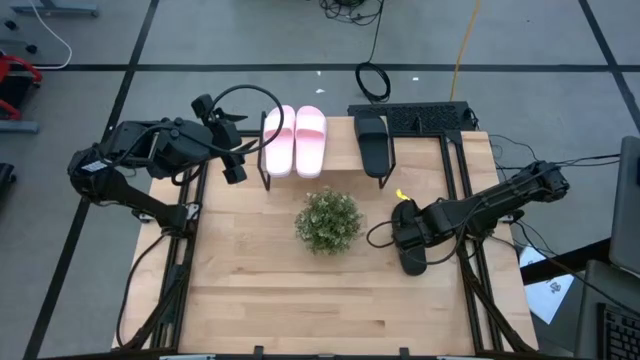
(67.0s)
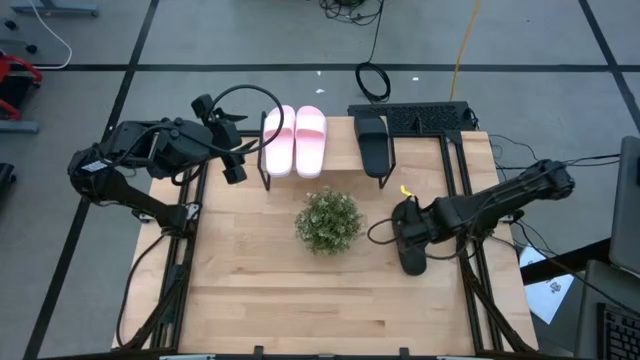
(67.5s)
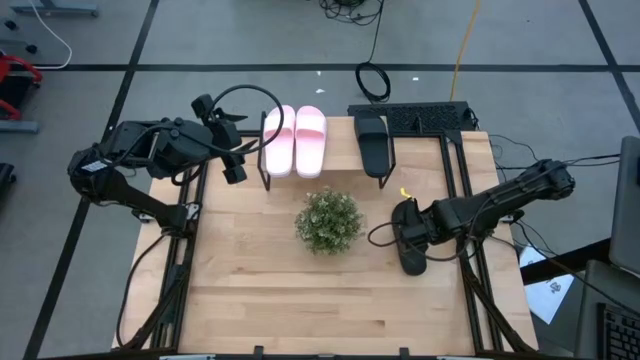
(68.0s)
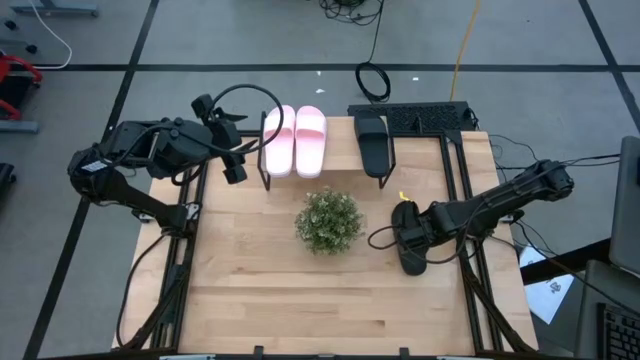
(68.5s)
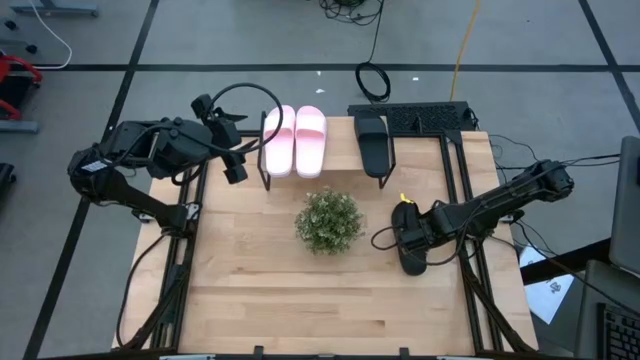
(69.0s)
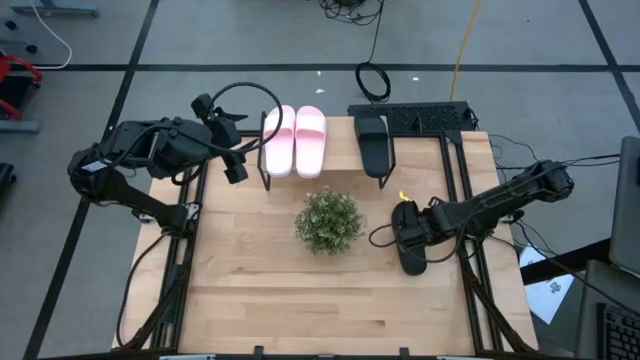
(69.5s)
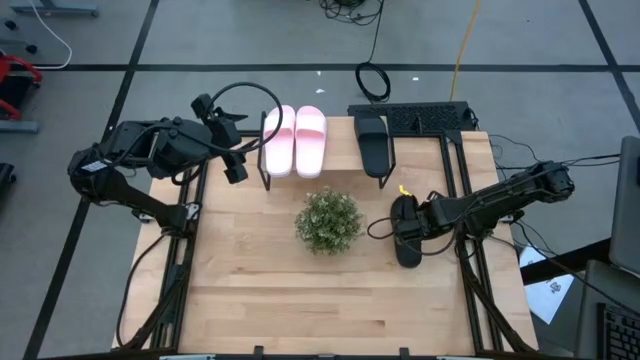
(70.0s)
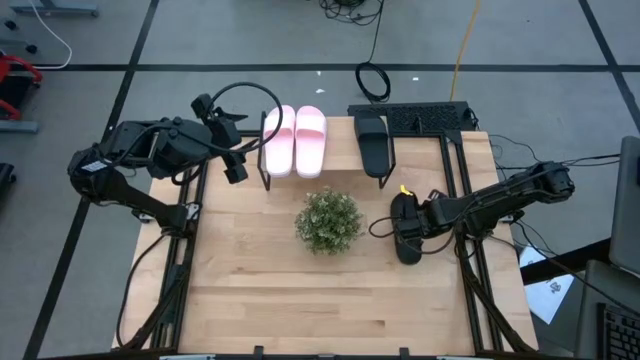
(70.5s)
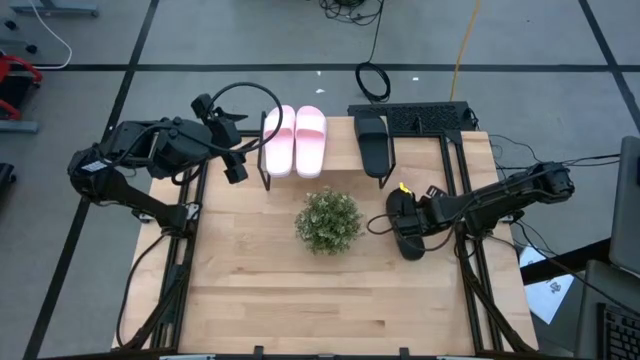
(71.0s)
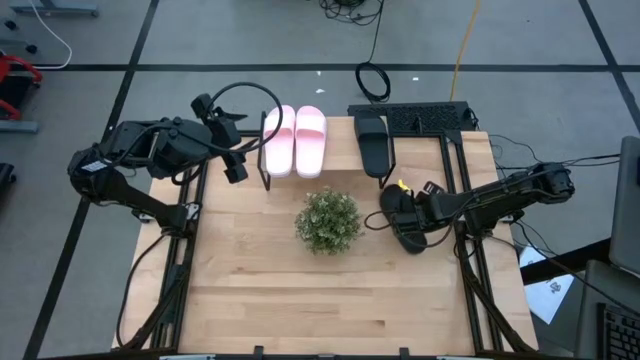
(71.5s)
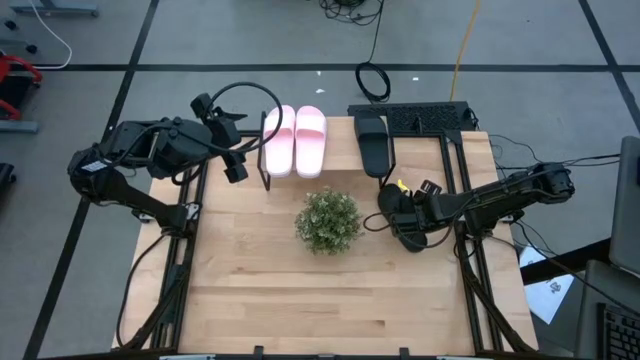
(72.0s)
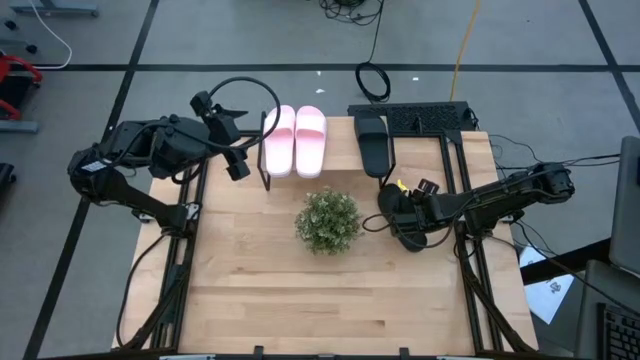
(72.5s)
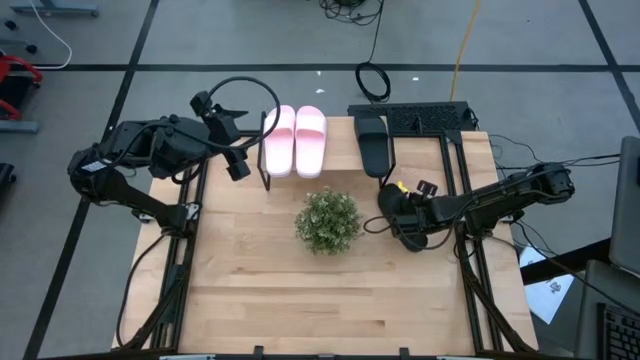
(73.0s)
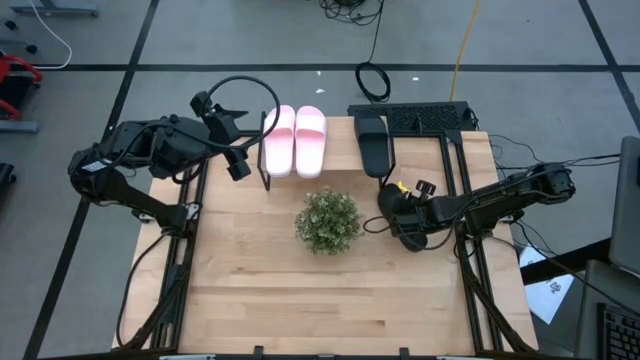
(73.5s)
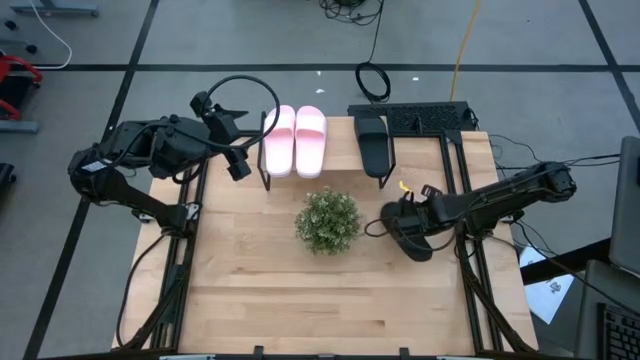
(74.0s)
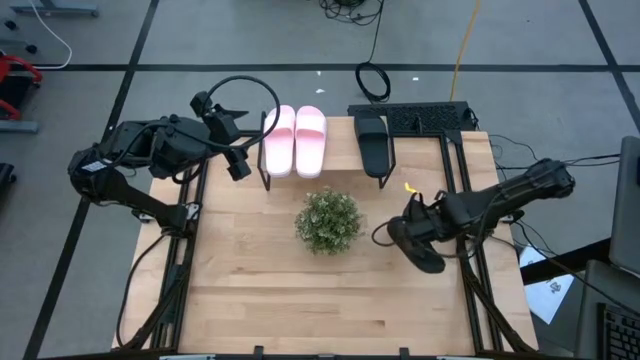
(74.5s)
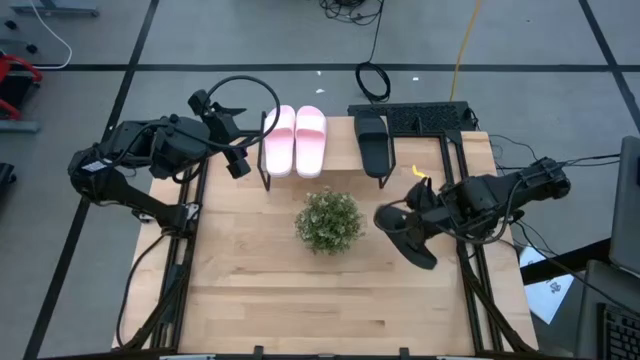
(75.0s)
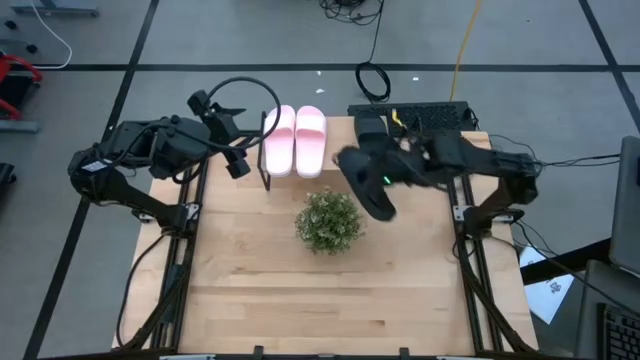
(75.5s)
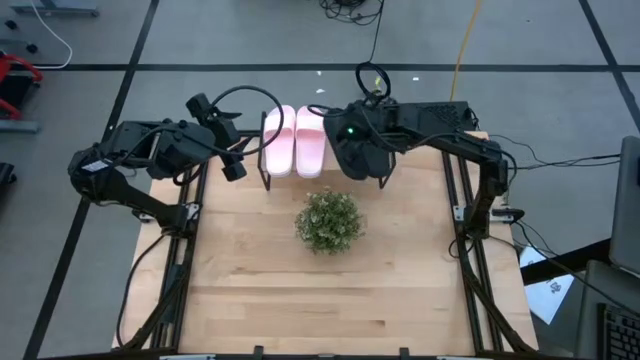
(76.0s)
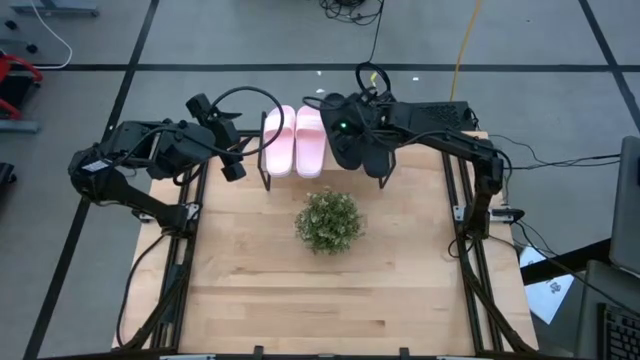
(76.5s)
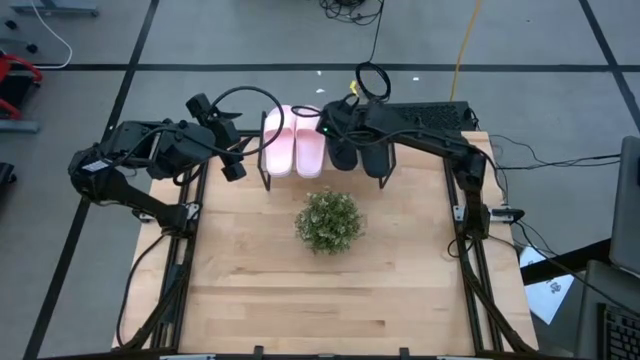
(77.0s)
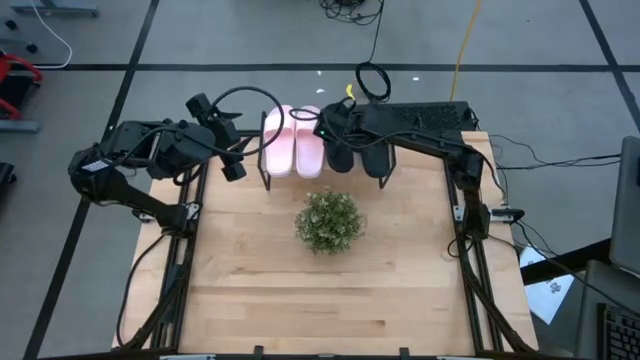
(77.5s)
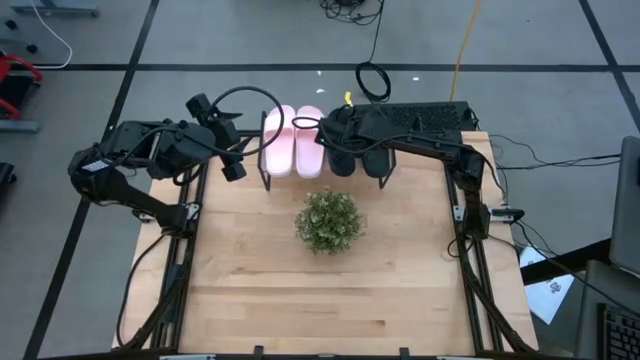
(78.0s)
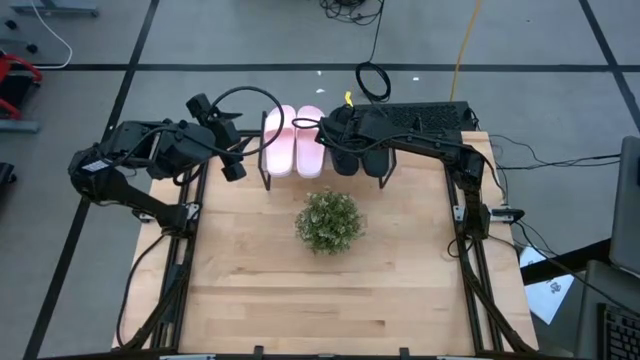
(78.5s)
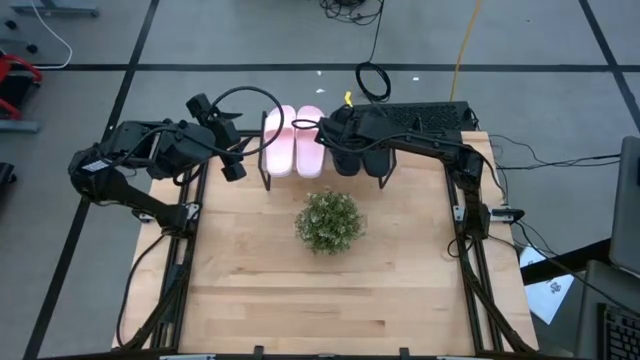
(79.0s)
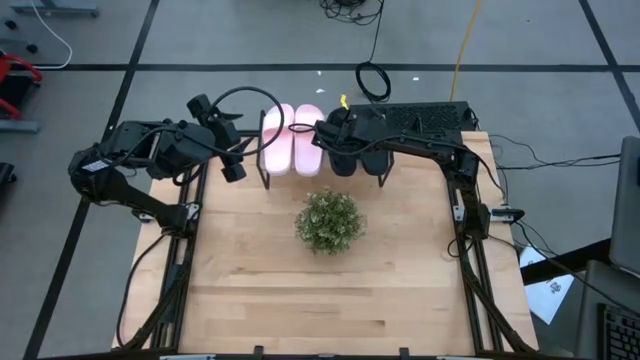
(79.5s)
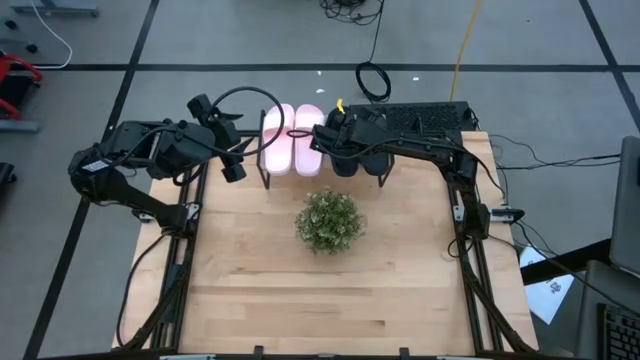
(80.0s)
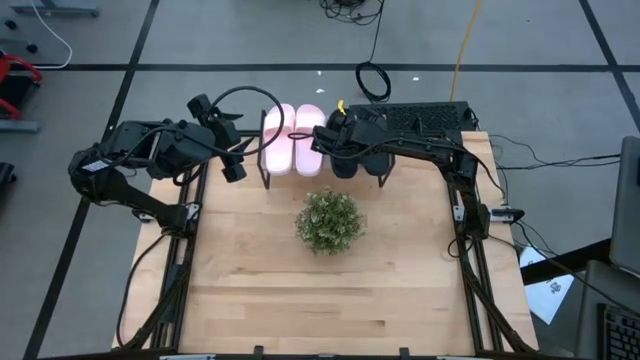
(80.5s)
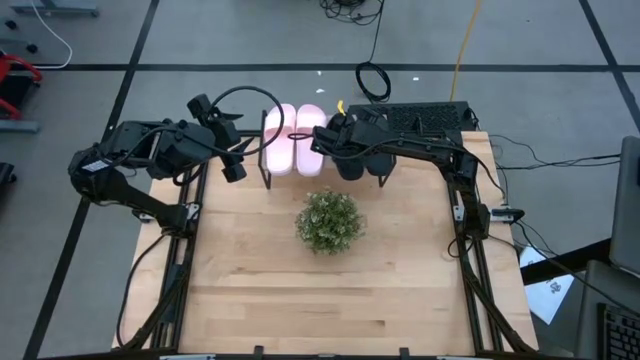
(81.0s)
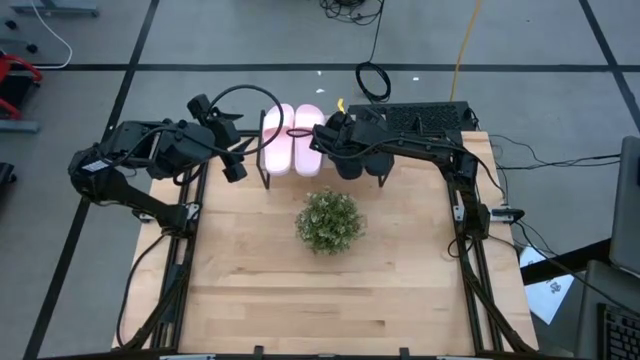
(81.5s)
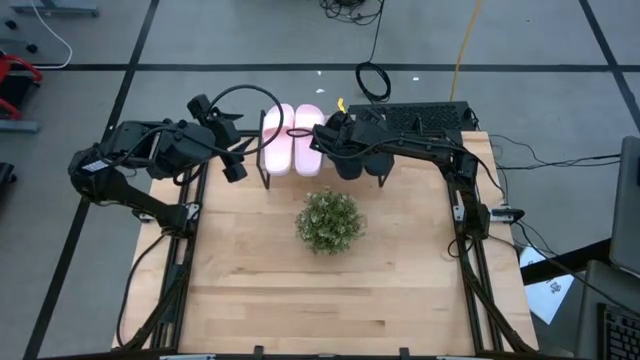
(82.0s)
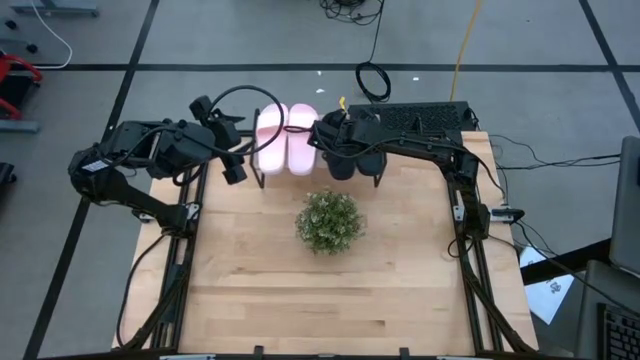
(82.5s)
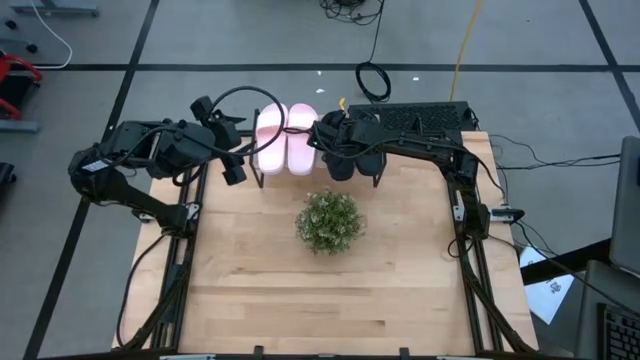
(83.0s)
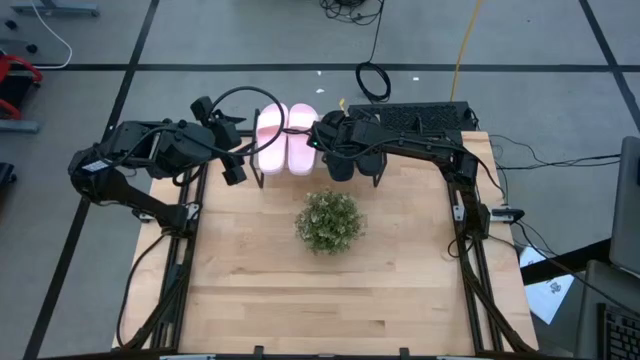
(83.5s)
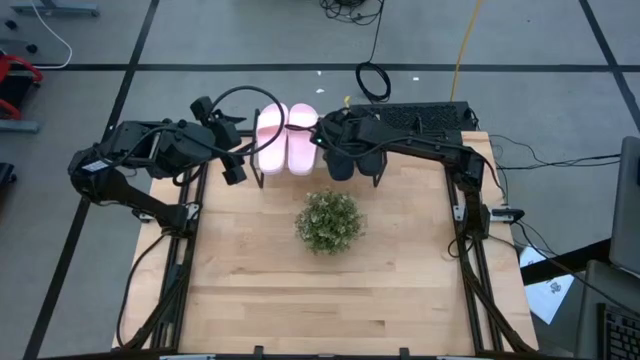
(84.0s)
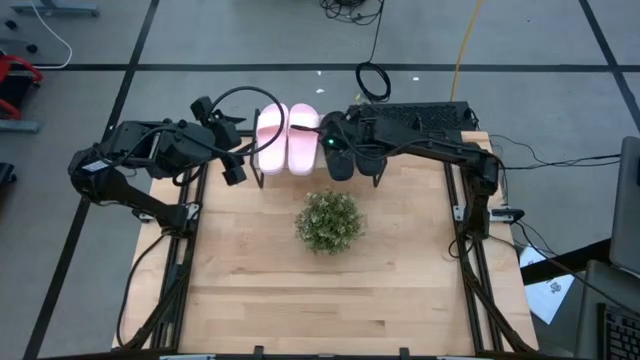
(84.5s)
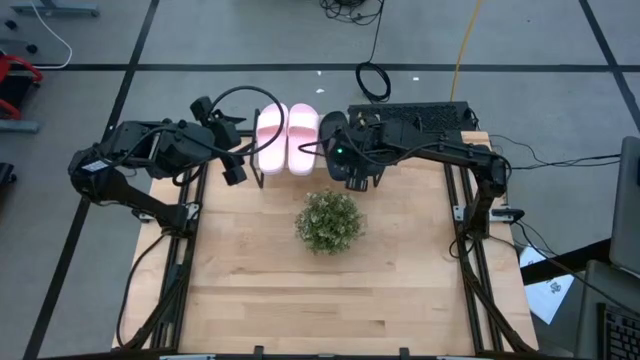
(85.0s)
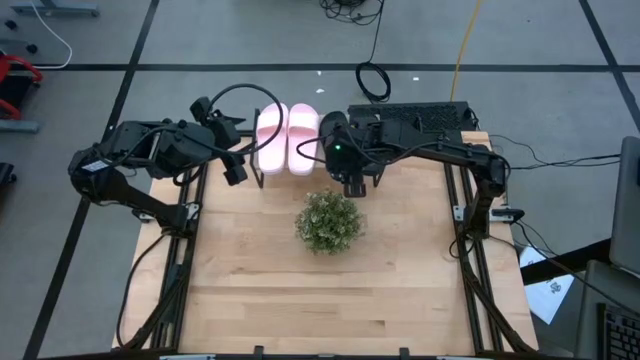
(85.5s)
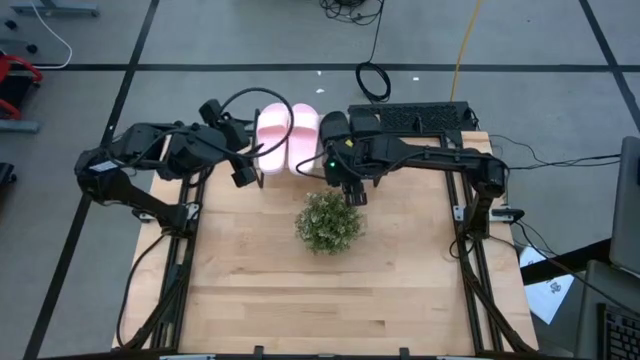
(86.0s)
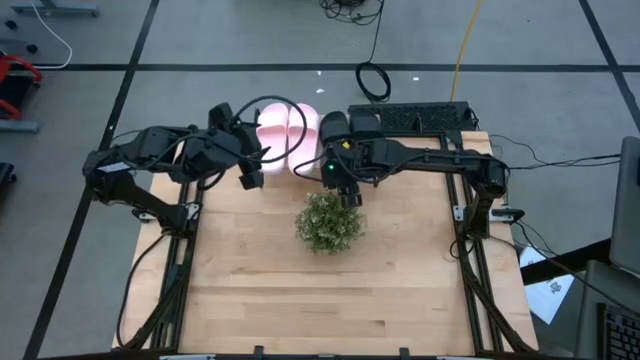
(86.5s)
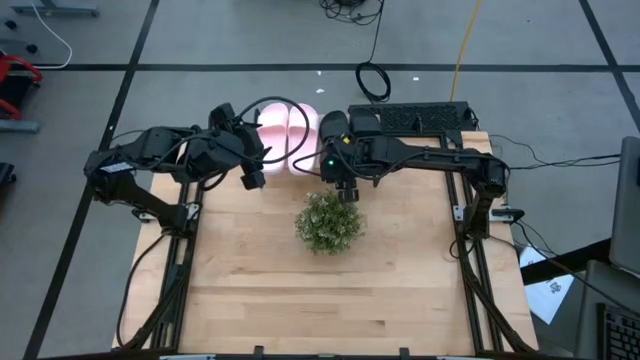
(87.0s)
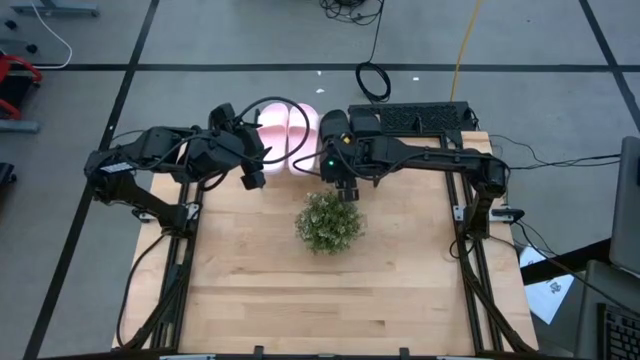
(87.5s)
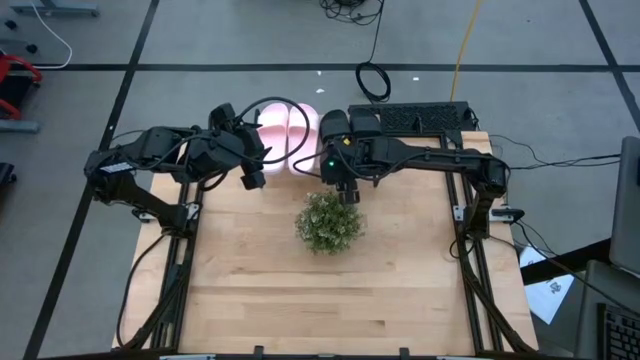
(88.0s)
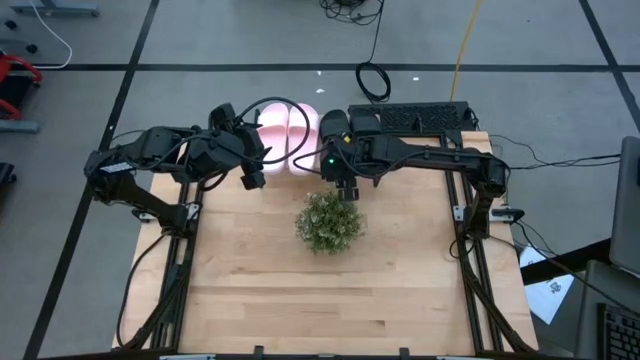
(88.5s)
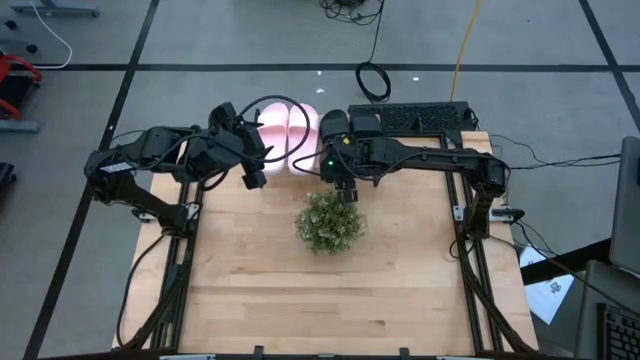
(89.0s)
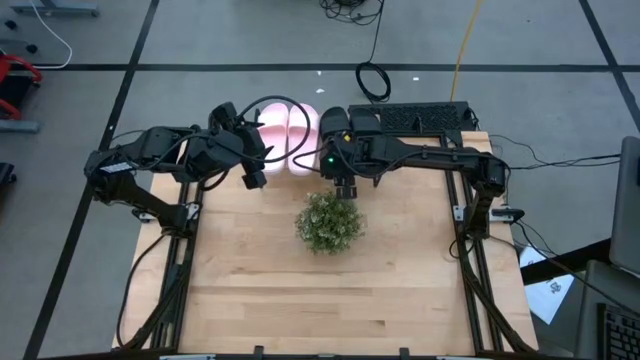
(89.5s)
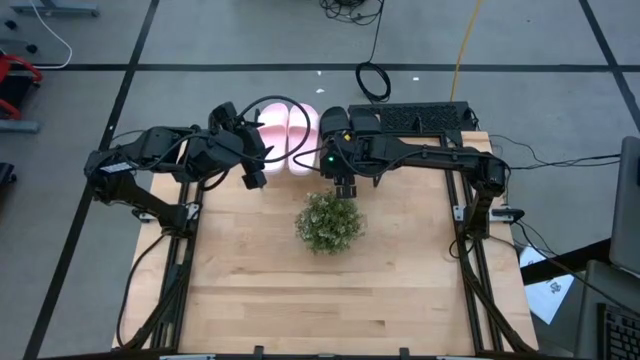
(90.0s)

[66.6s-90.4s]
Task: Pick and place slides into the shelf
Put the black slipper on the shelf
